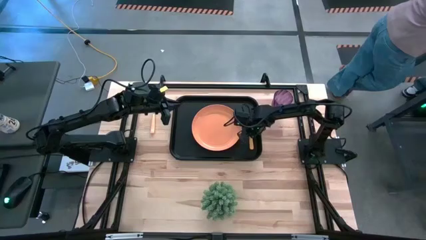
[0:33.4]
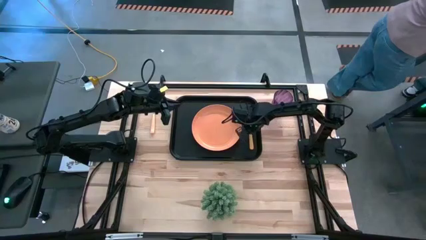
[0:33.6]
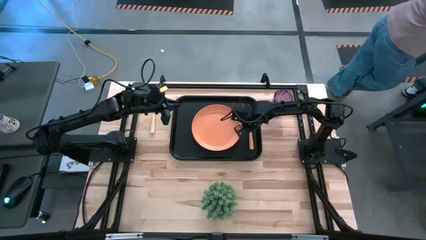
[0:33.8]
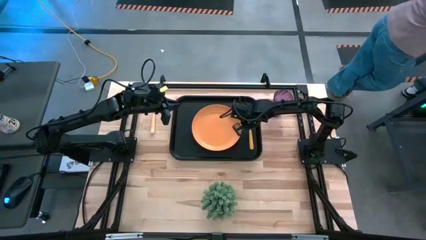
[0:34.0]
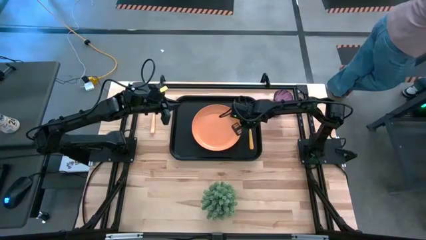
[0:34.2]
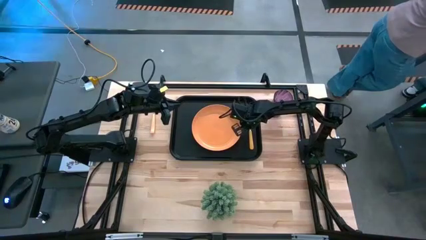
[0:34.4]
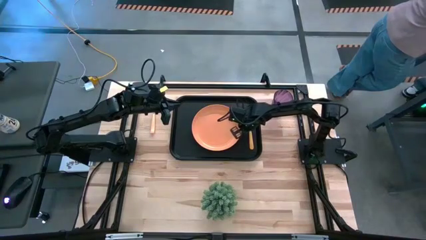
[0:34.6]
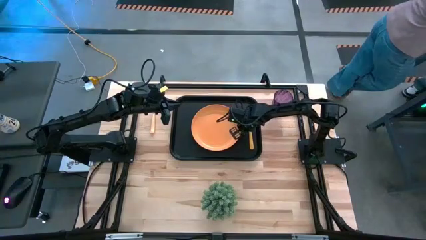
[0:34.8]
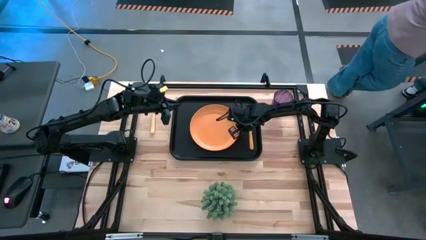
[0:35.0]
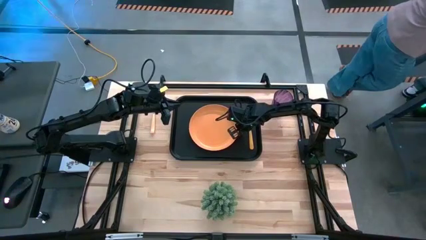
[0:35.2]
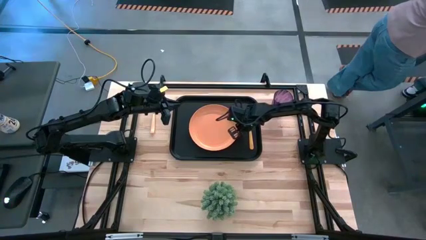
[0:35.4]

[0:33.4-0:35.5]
Task: Pick and place plate/cup/fork/spoon on tray
Adjust the orange plate

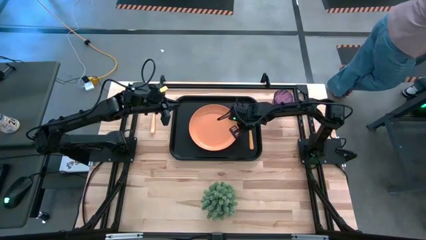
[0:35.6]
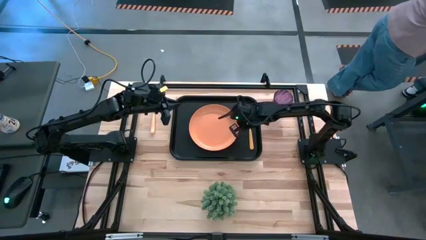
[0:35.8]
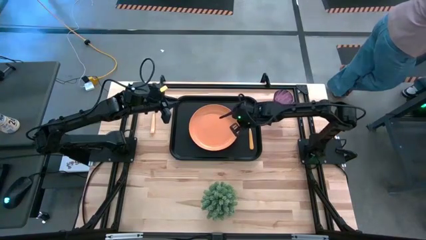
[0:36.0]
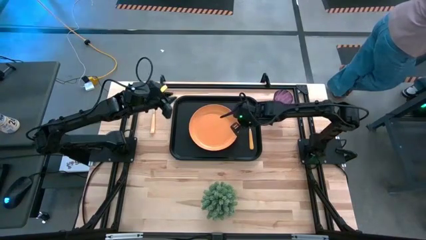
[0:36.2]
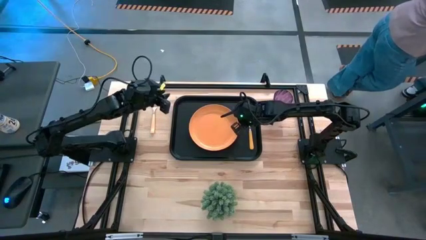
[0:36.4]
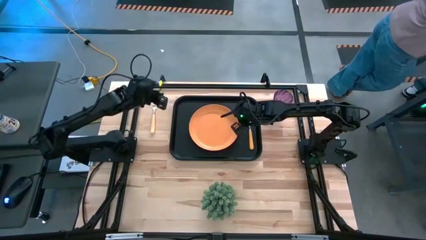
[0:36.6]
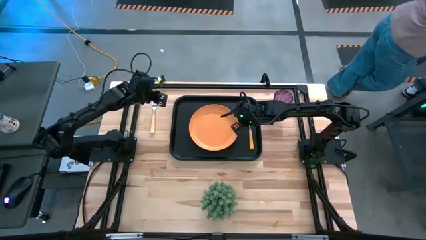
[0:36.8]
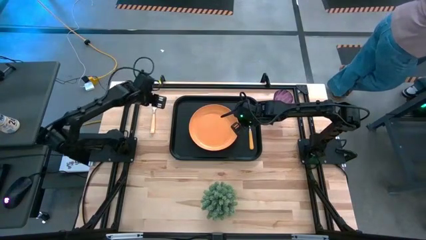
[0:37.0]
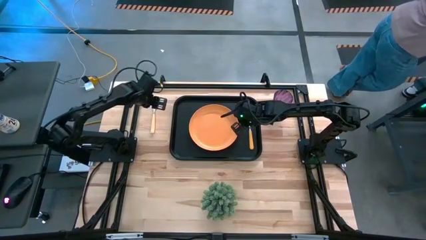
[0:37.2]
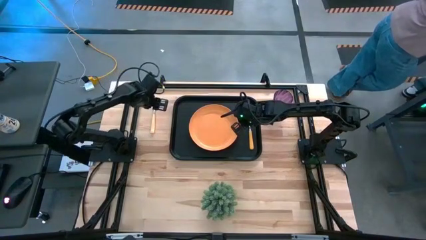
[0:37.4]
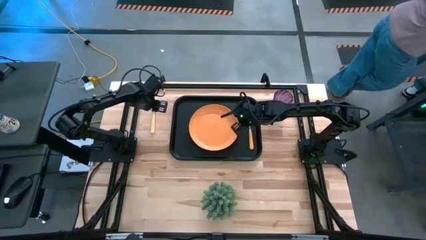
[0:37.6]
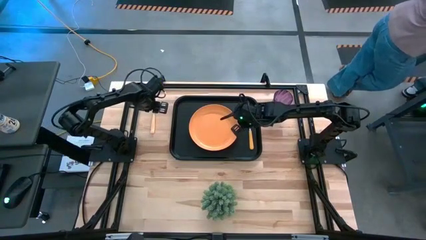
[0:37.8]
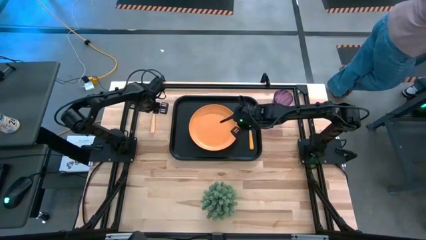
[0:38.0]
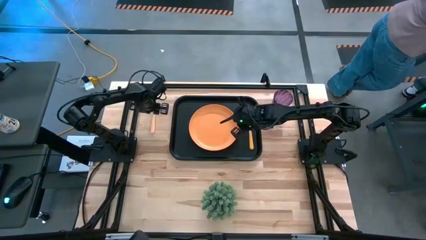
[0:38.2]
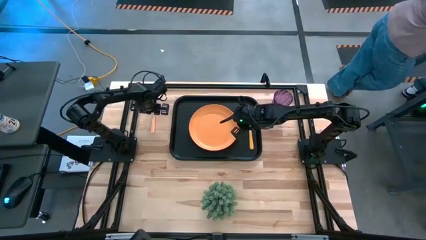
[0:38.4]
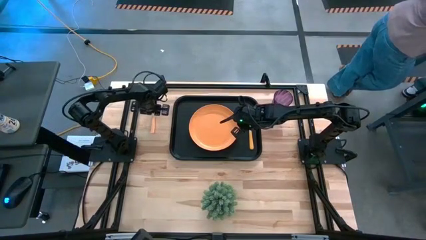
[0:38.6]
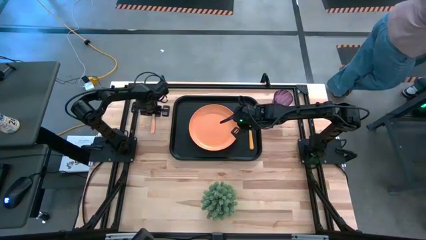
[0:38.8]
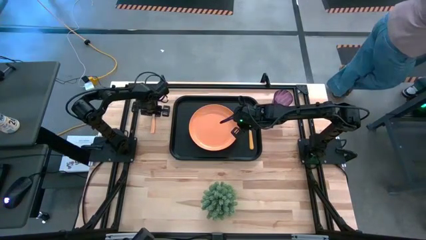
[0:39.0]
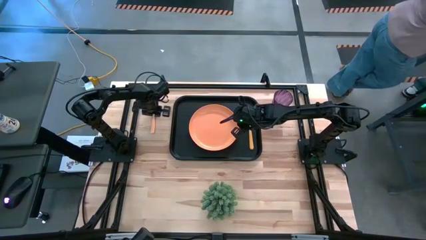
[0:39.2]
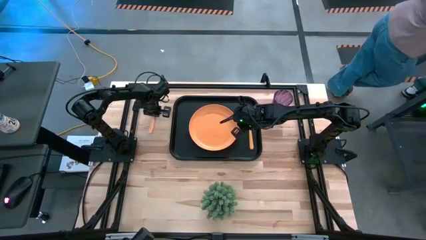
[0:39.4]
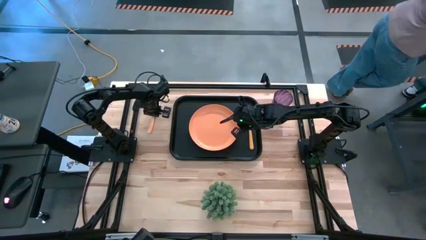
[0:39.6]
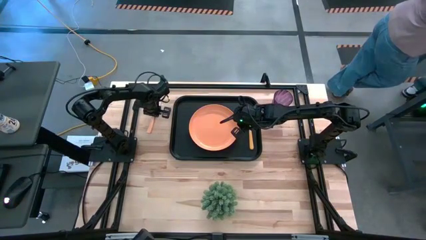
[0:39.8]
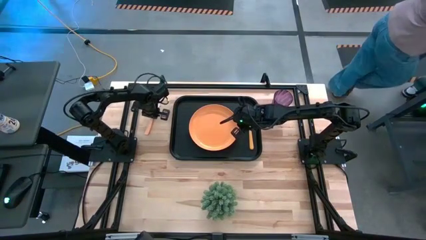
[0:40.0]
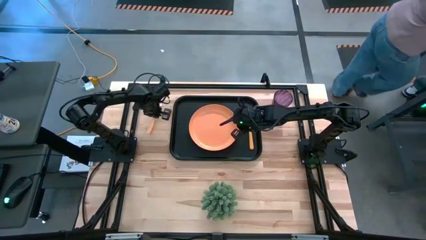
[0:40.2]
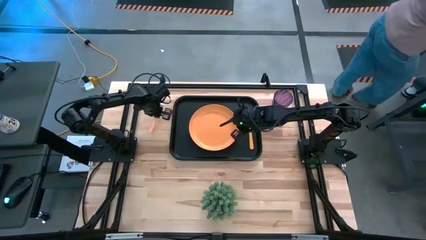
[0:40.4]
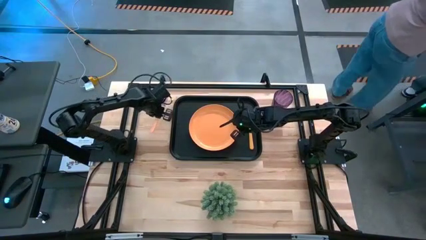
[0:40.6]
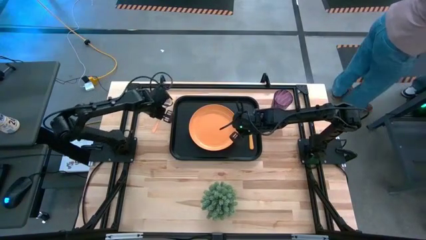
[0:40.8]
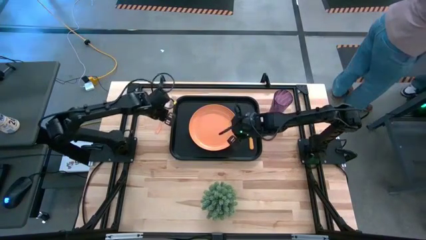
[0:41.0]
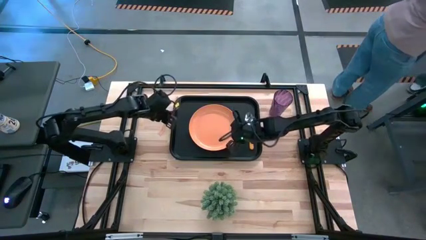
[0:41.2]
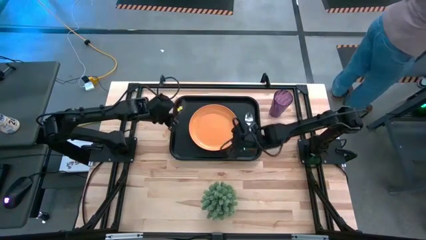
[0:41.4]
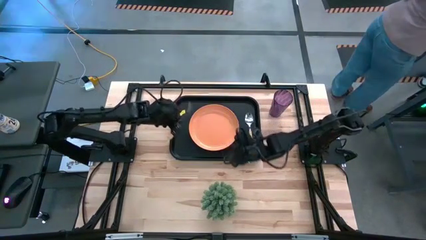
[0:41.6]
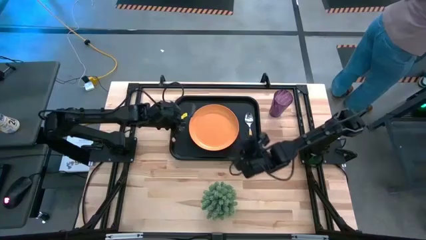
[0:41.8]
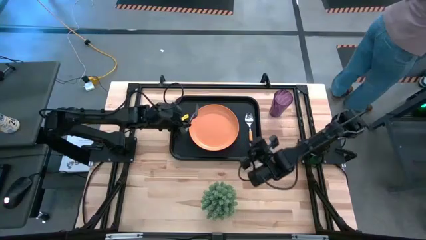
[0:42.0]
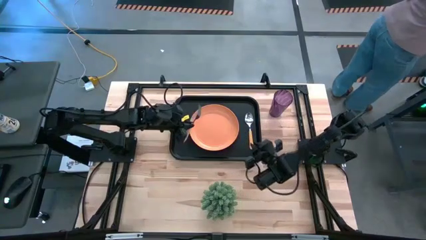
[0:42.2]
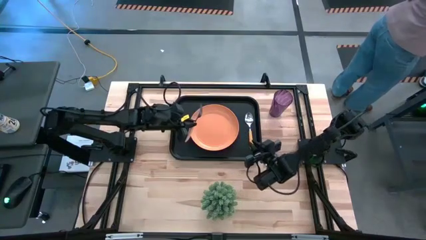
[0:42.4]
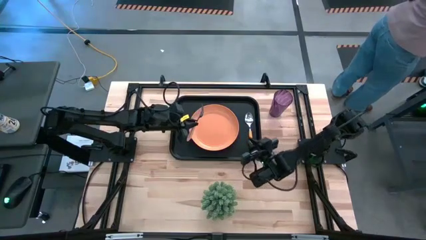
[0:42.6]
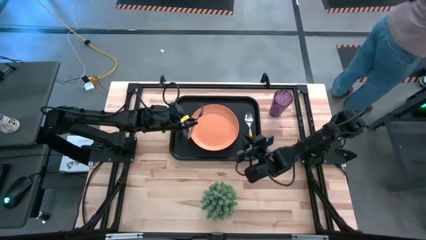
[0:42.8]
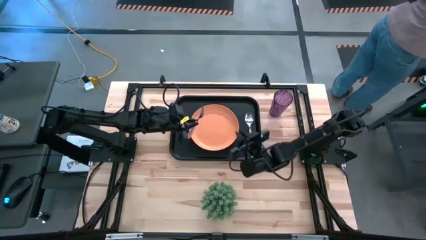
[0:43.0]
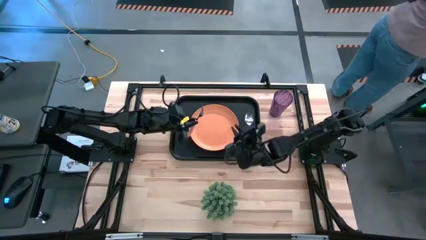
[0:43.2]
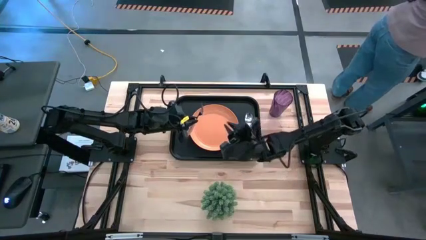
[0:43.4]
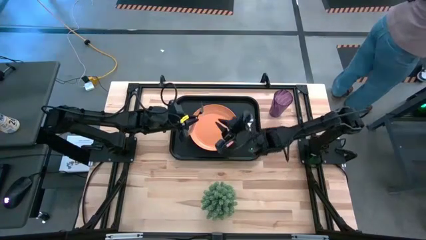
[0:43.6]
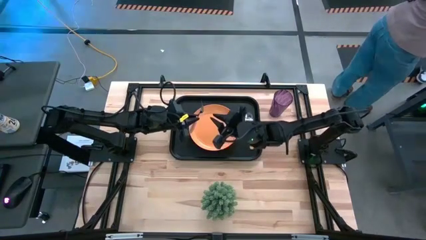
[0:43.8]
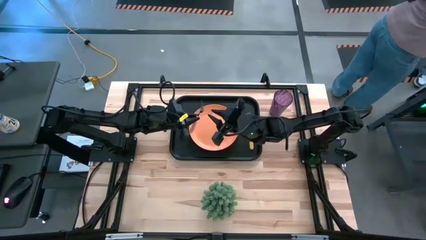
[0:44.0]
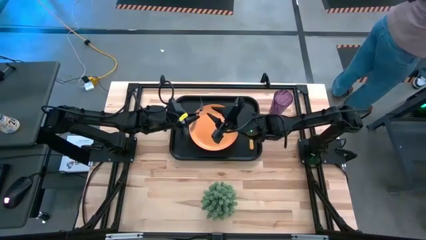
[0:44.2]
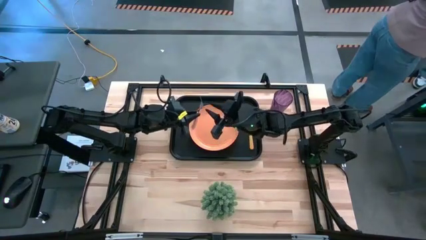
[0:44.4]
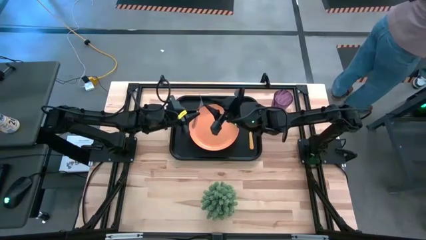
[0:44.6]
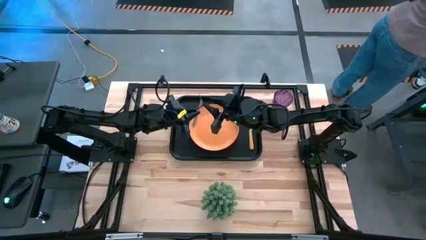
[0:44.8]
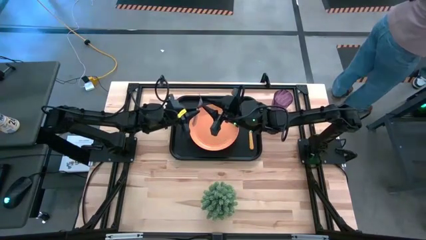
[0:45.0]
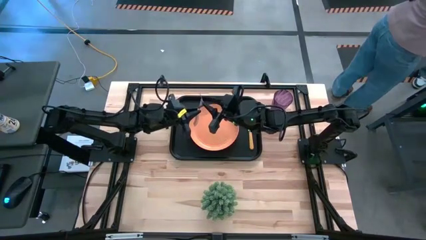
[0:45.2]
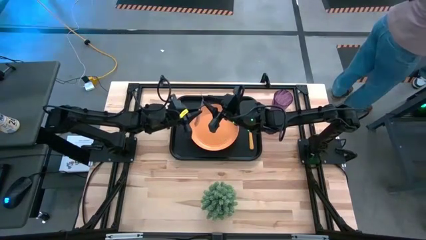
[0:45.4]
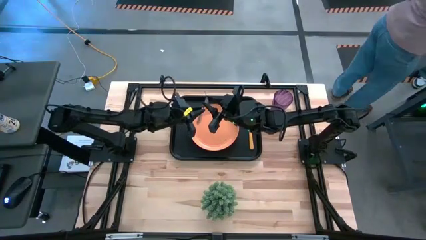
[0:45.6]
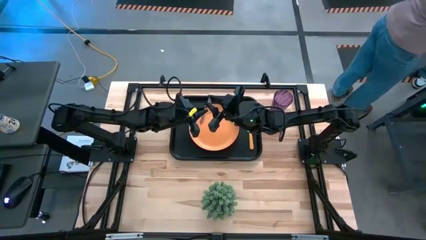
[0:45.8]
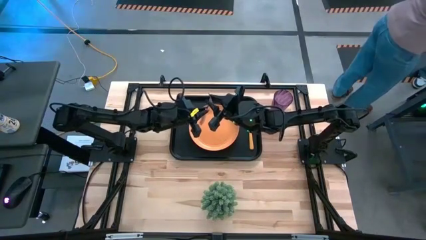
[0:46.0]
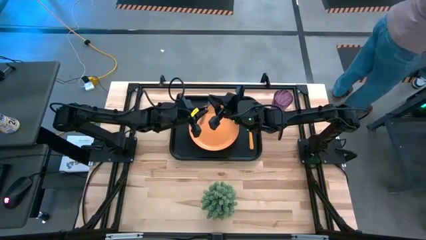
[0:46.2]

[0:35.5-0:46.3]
Put the yellow fork on the black tray
